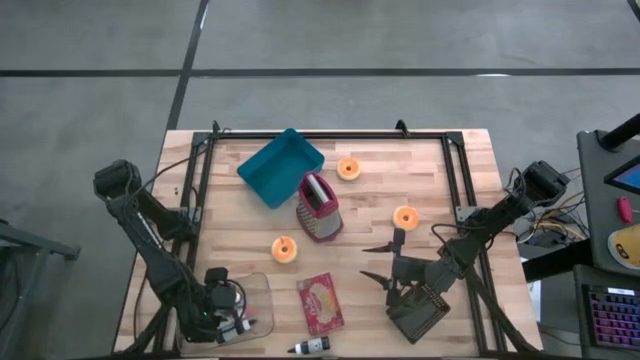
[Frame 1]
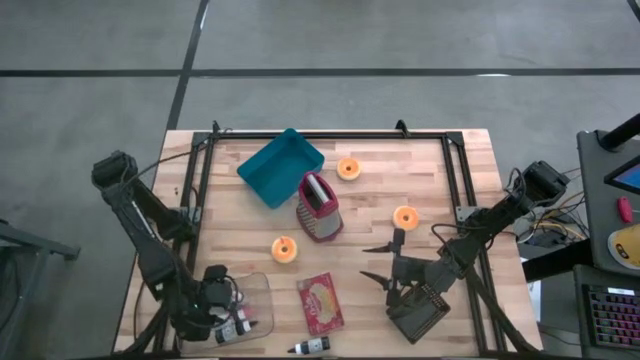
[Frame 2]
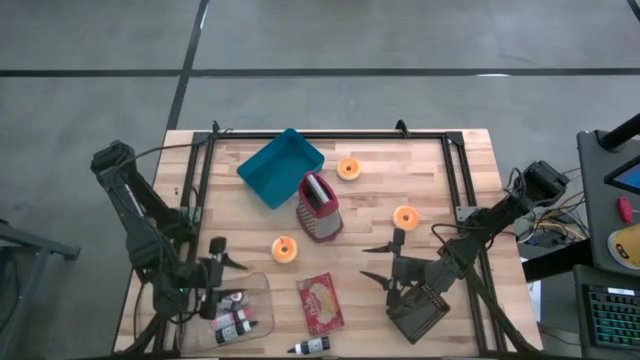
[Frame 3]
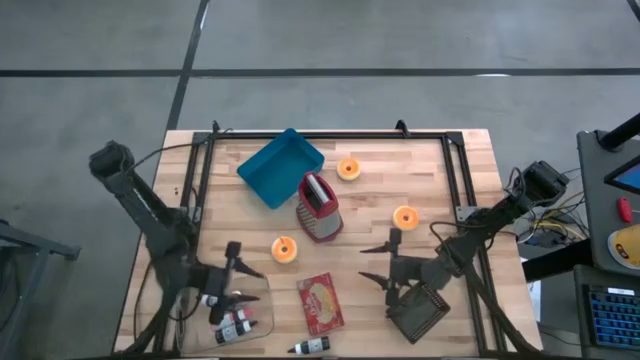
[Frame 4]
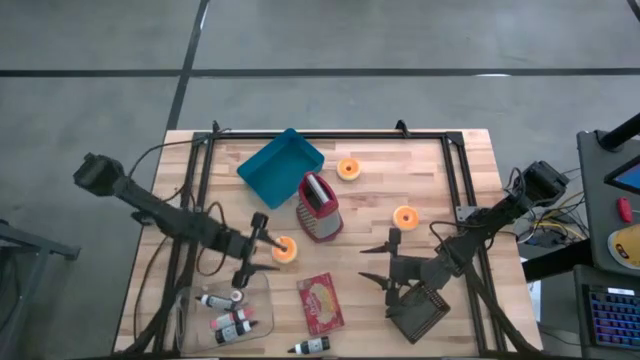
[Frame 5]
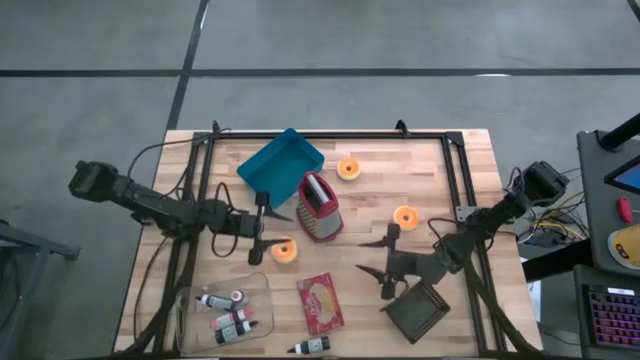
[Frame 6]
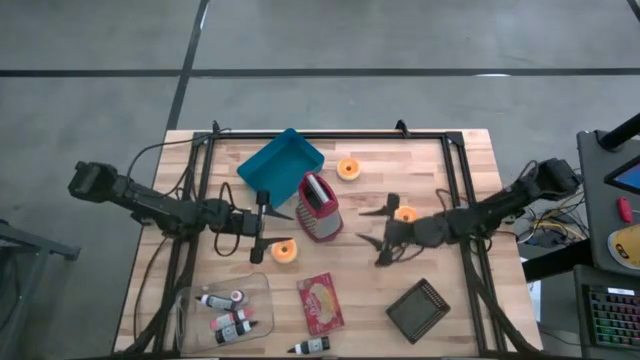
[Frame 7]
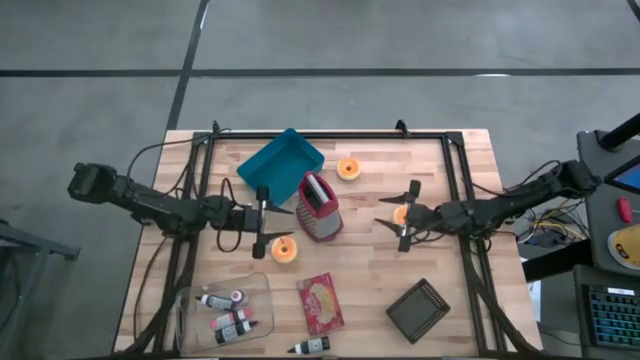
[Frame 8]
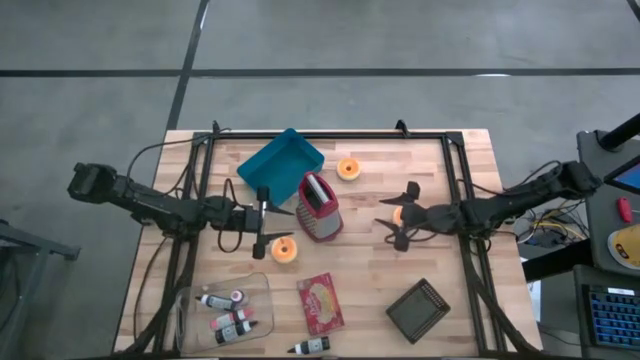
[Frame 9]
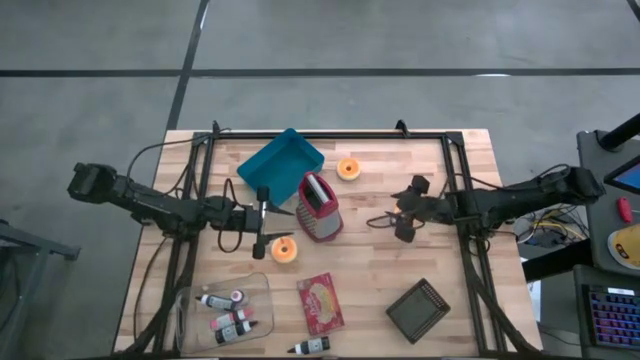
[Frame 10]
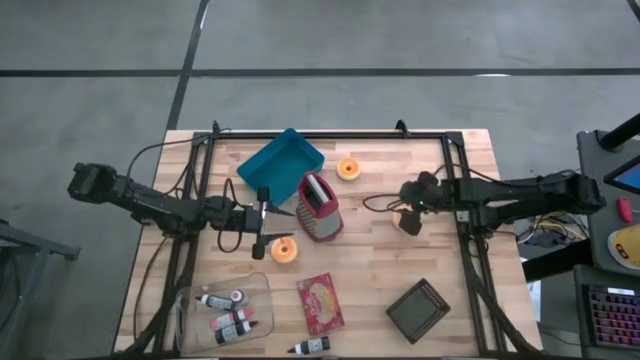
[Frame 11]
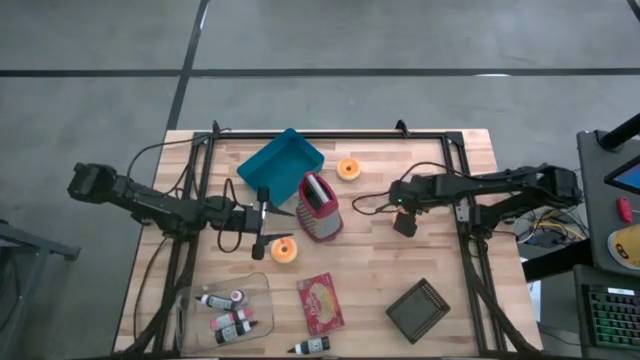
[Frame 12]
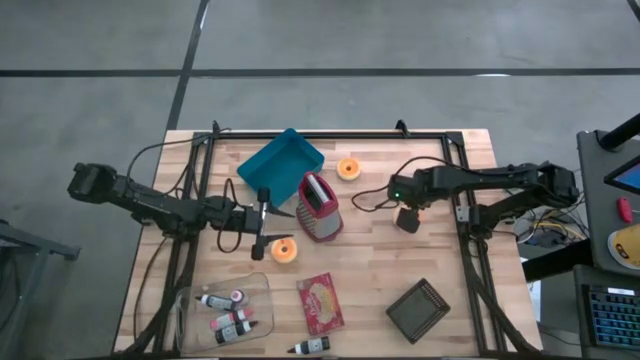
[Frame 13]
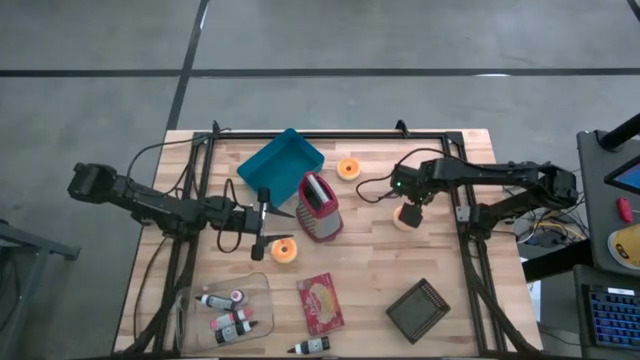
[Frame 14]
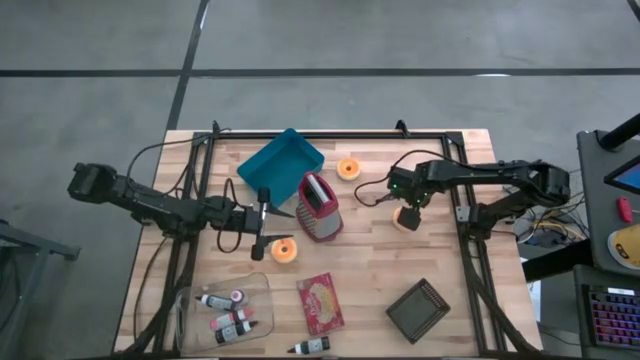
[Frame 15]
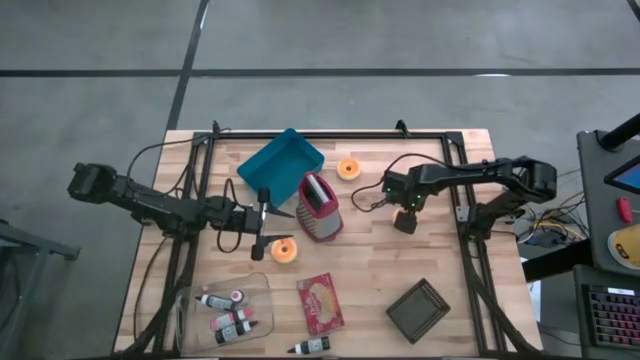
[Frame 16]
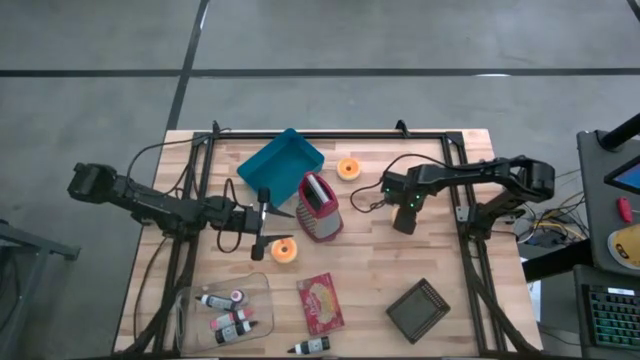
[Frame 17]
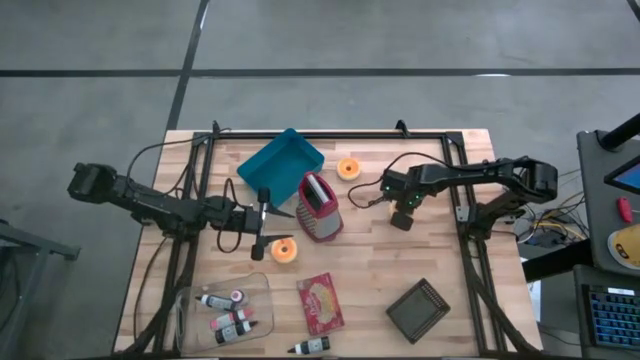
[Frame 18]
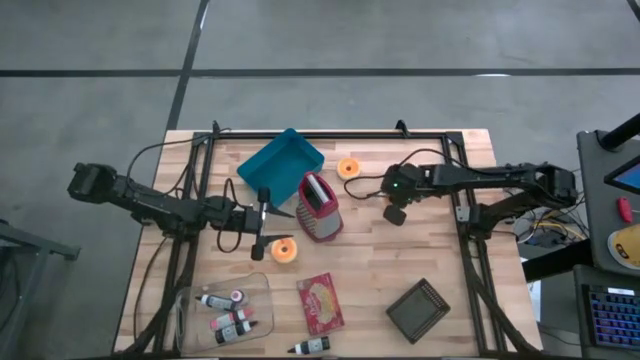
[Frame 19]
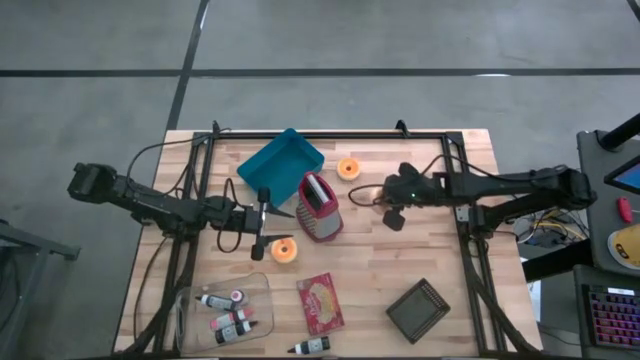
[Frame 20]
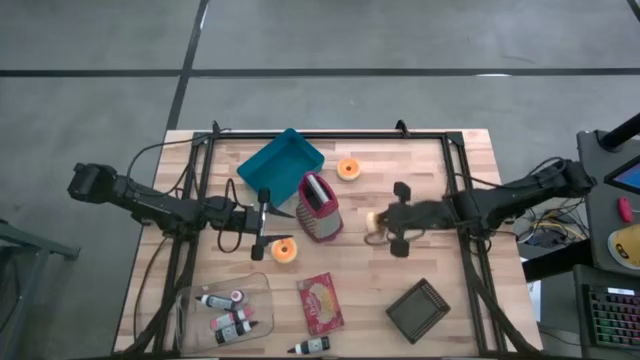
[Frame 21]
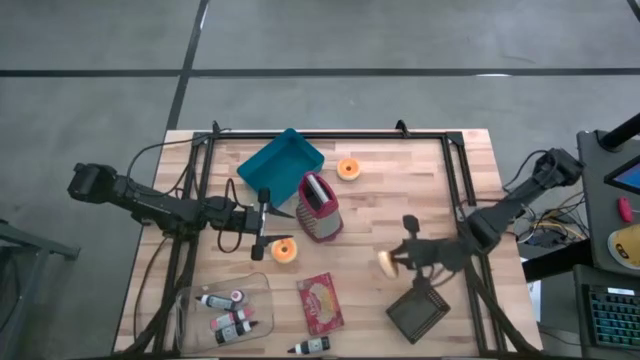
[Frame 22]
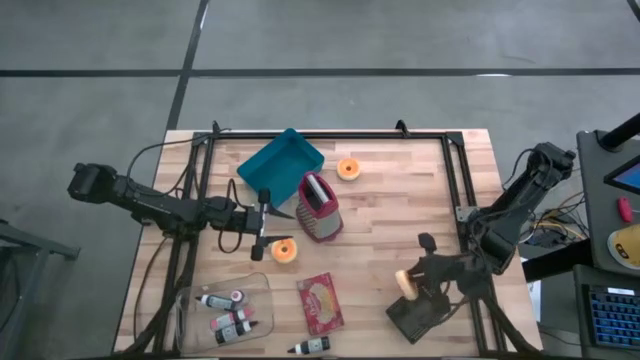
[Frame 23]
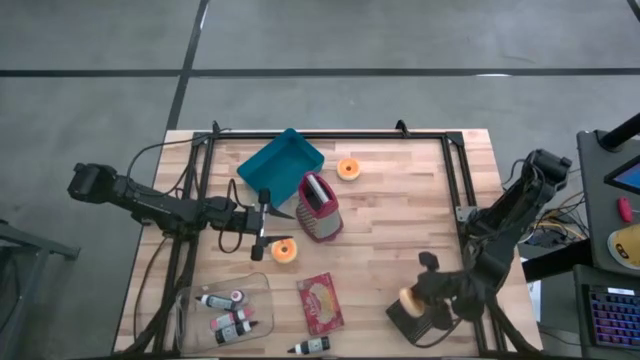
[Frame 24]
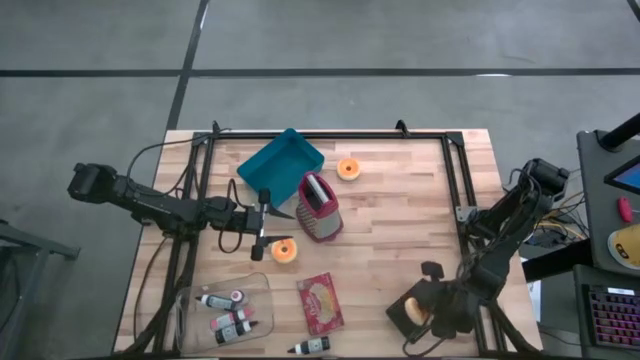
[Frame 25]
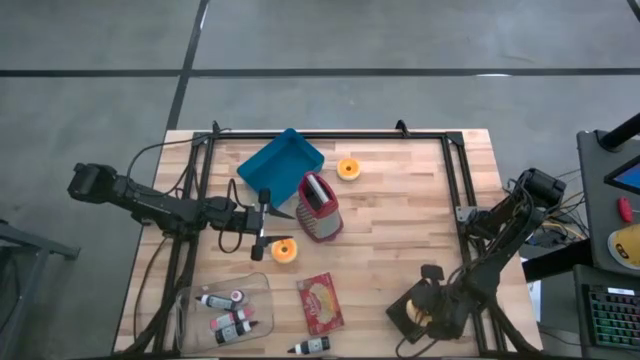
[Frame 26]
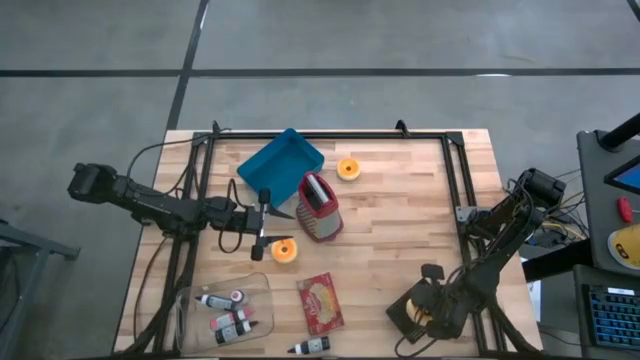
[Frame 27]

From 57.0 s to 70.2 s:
Put the middle orange donut into the black bin
